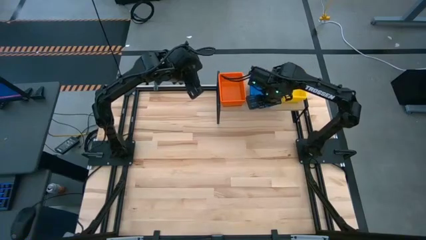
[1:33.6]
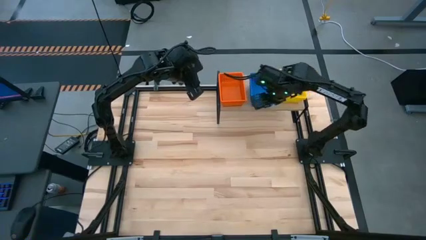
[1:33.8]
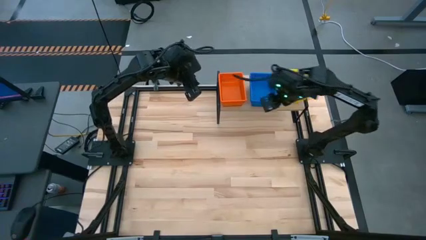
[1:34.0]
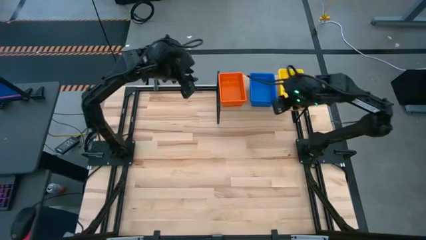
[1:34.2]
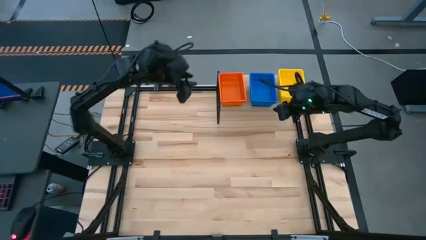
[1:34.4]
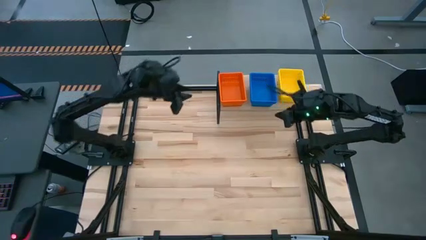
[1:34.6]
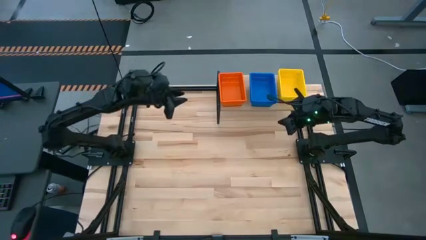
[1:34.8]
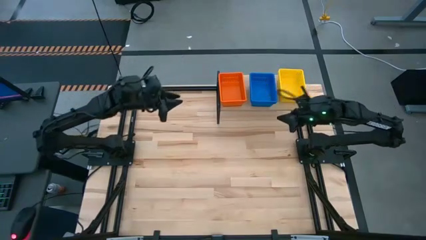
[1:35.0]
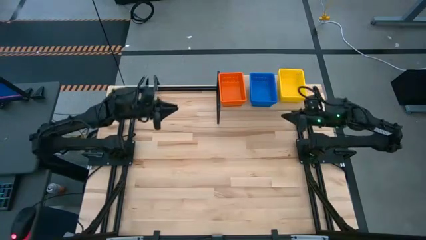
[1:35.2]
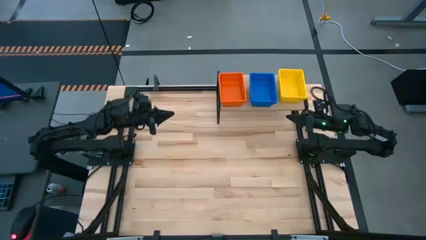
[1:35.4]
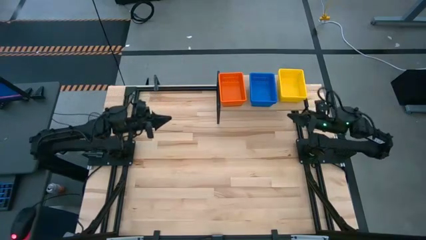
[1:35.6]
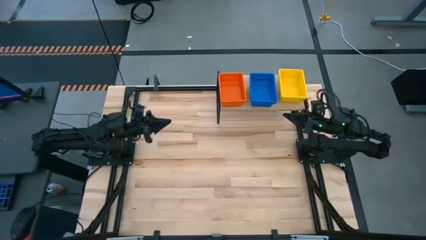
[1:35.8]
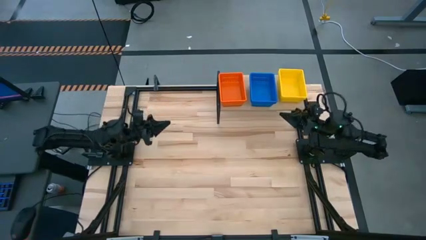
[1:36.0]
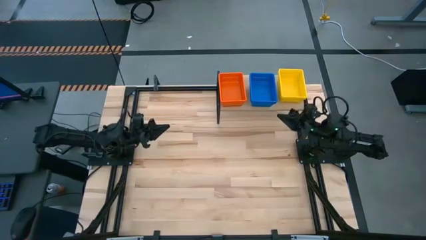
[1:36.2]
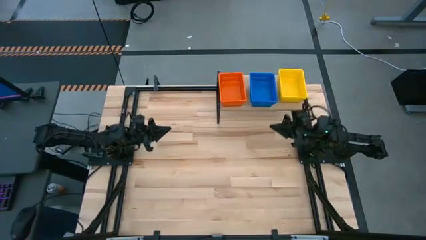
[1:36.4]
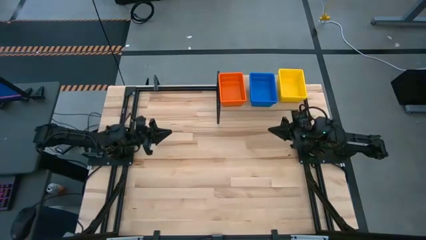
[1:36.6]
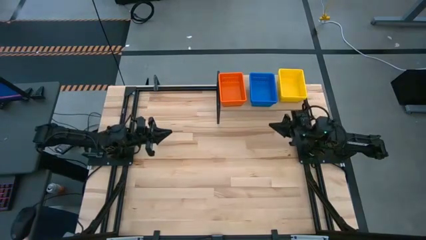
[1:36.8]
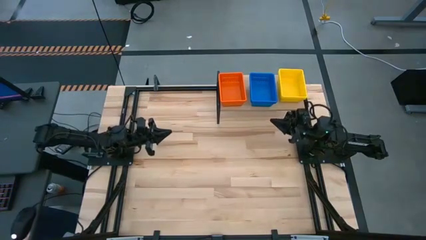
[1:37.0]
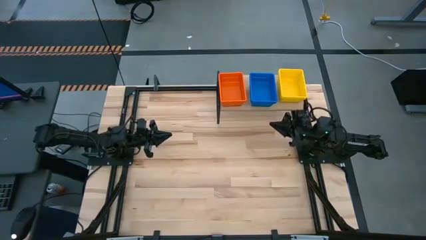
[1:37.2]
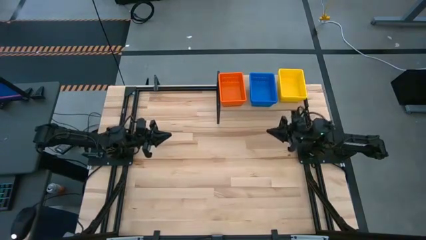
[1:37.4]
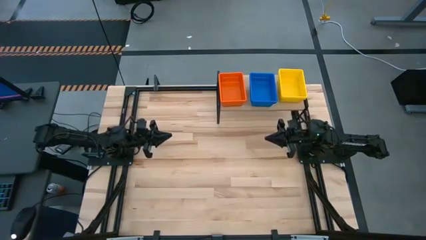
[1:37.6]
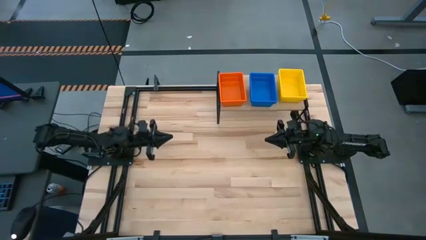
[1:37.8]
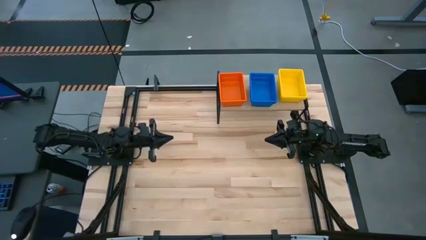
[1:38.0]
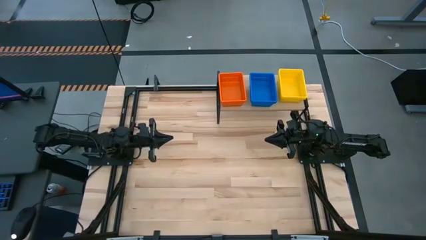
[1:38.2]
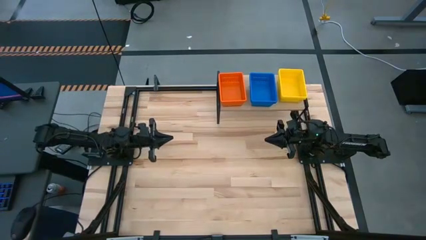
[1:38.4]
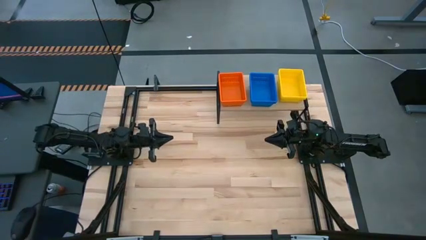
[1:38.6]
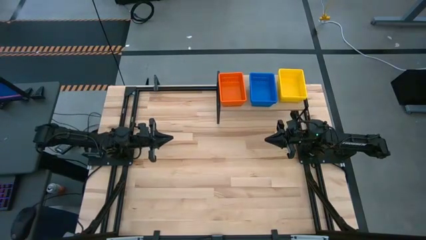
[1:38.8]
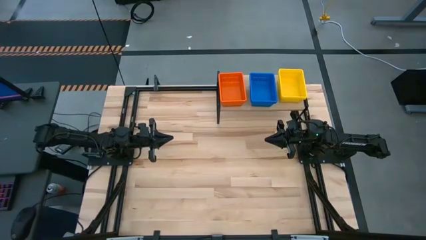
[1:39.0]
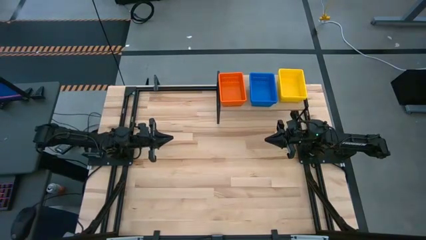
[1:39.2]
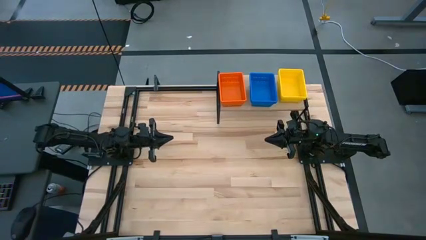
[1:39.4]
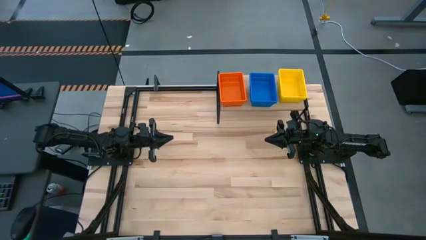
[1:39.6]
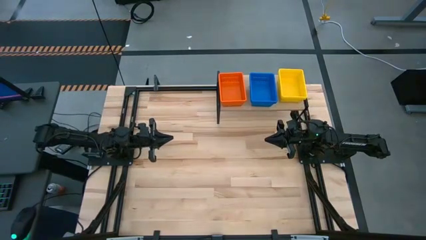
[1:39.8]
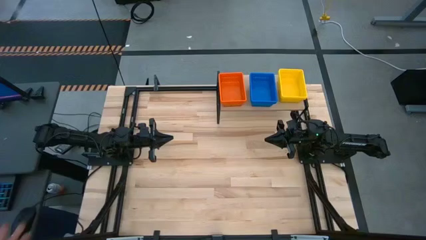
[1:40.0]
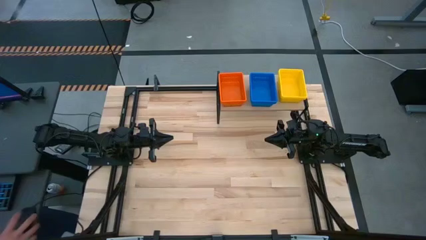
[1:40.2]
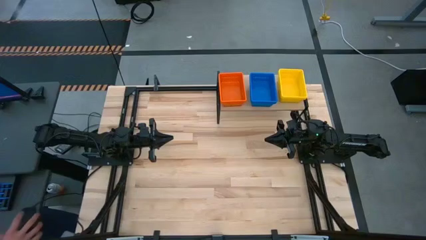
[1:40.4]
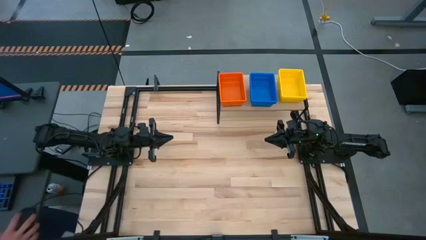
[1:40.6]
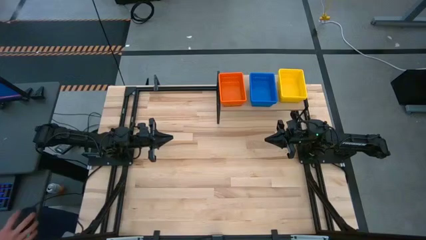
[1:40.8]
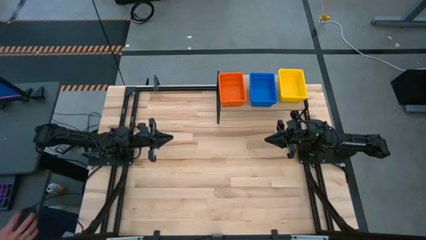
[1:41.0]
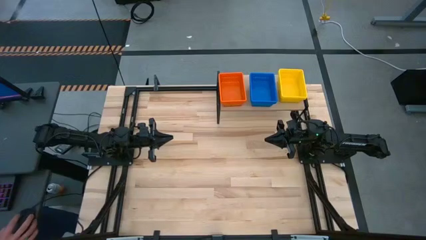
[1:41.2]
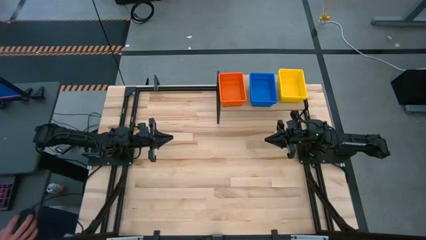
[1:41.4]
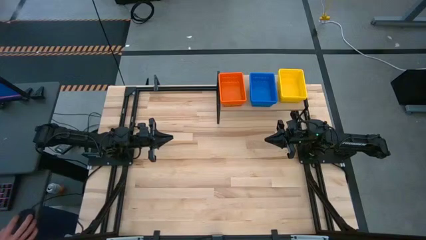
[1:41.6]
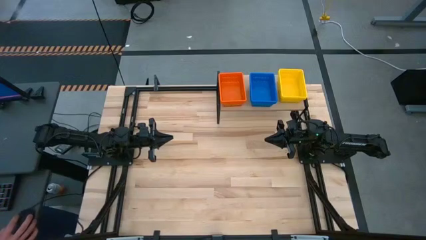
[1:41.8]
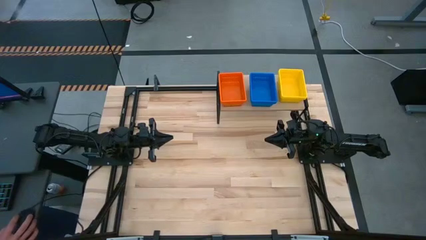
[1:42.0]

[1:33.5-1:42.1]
Task: Stack baskets on shelf by color
Return to Home Position

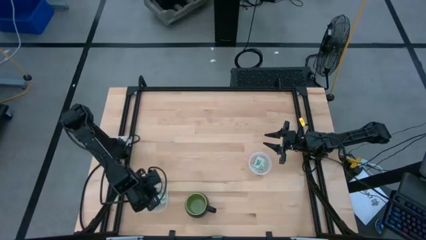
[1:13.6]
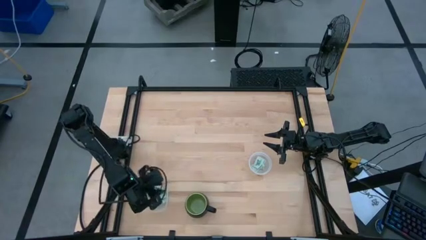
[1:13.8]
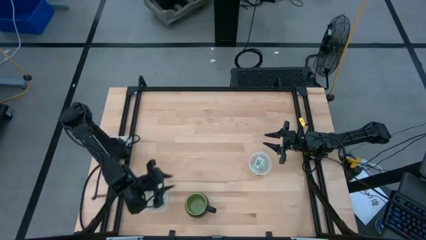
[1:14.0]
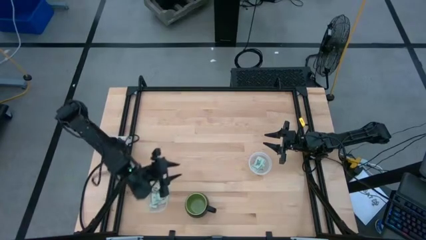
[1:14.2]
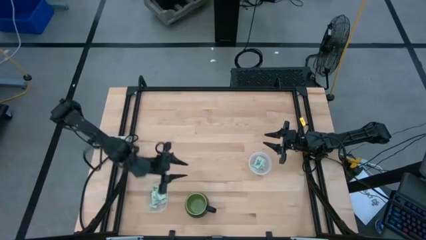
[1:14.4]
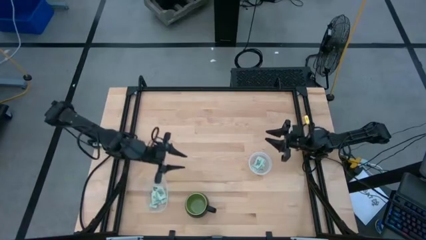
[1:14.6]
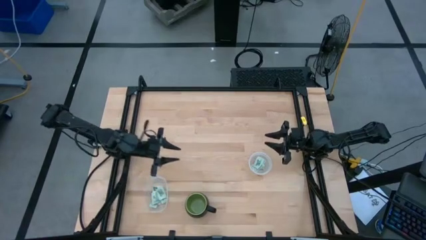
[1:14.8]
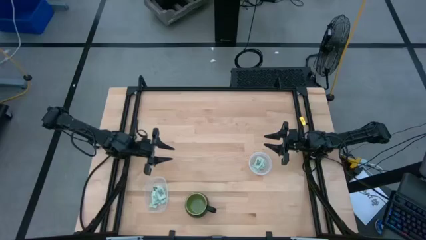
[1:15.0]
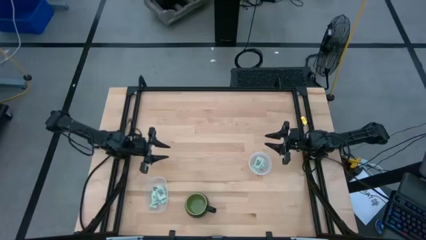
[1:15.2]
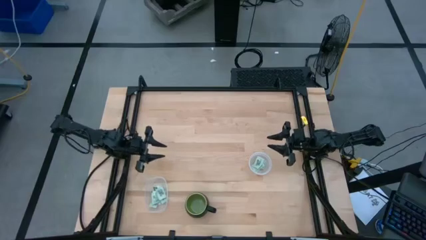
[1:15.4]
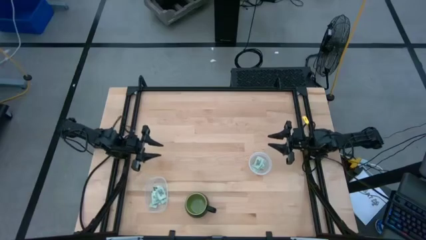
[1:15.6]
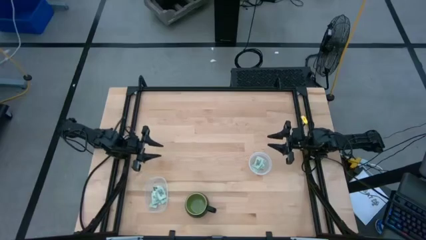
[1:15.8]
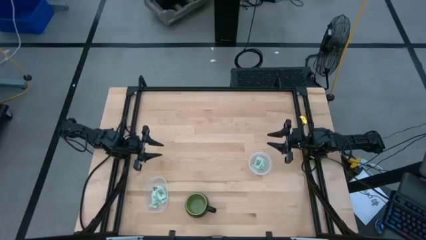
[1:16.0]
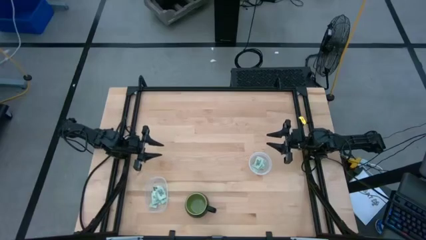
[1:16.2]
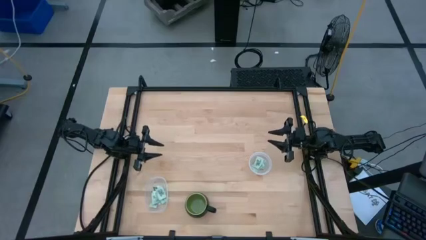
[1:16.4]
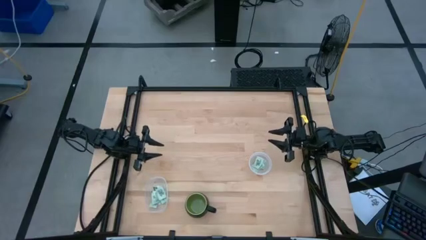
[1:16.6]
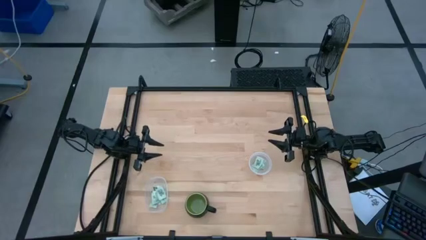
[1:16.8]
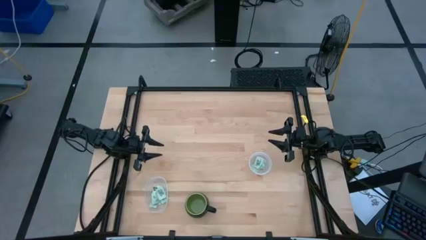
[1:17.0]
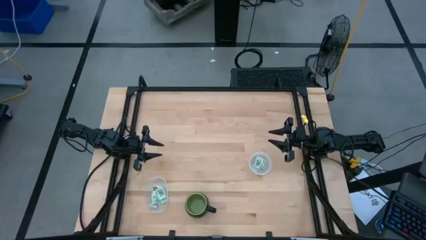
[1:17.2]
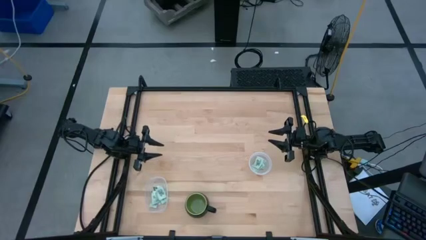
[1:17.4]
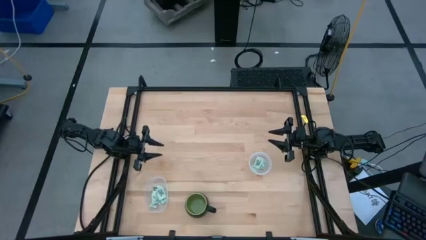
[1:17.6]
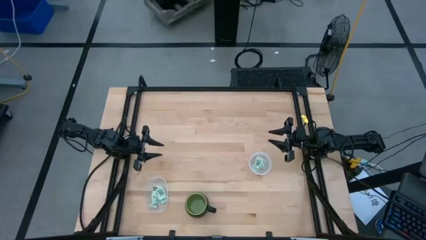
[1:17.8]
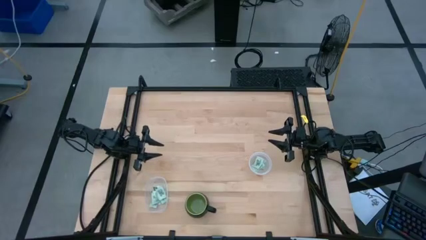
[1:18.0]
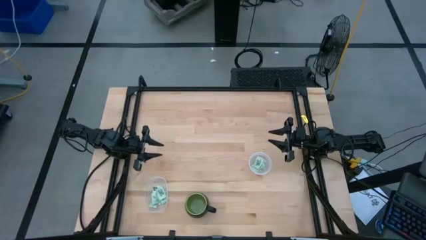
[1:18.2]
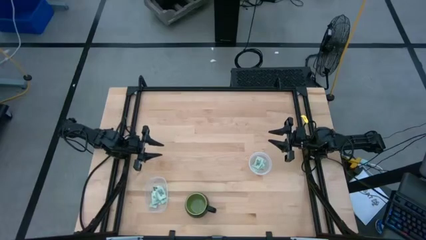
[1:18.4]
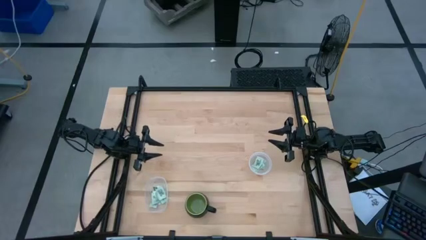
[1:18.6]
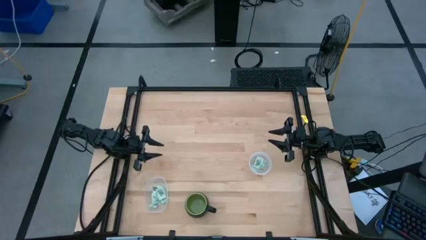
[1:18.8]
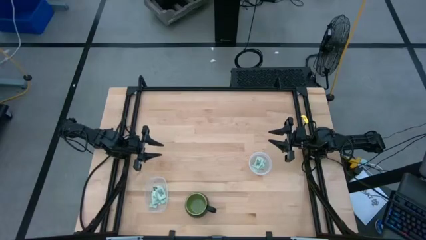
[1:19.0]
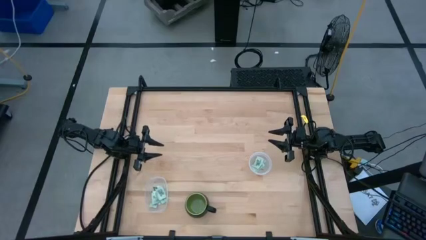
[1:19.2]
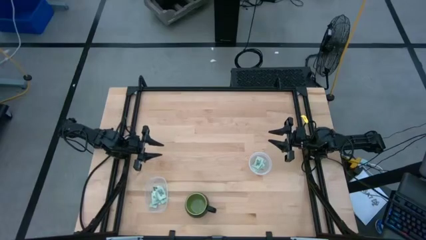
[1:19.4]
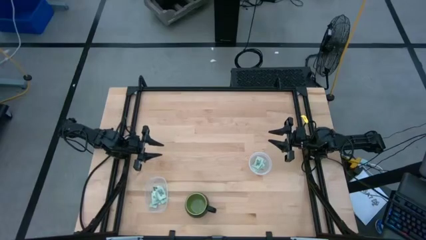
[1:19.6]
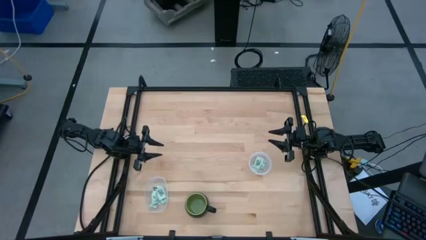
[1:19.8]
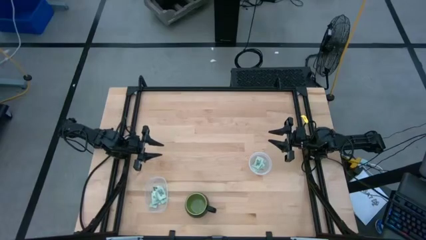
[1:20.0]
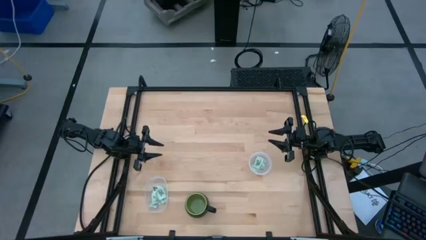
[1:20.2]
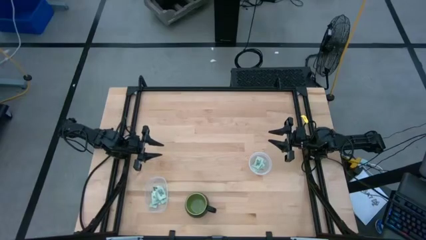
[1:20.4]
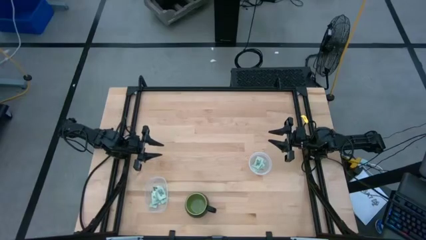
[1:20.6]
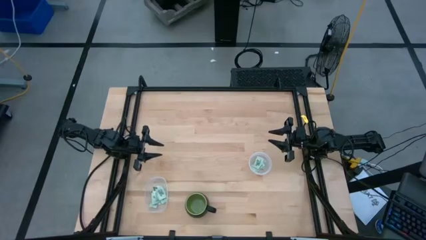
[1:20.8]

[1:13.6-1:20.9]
Task: Pick and place Stevia / Truvia into bins
Return to Home Position
